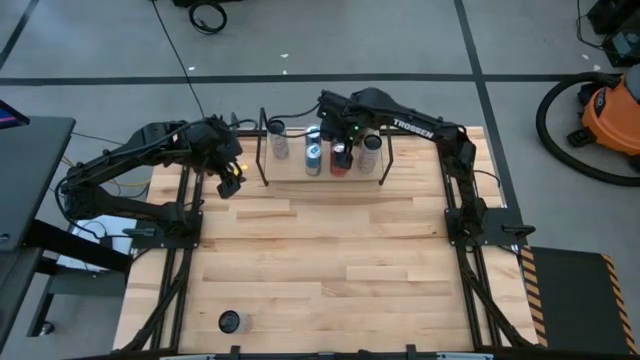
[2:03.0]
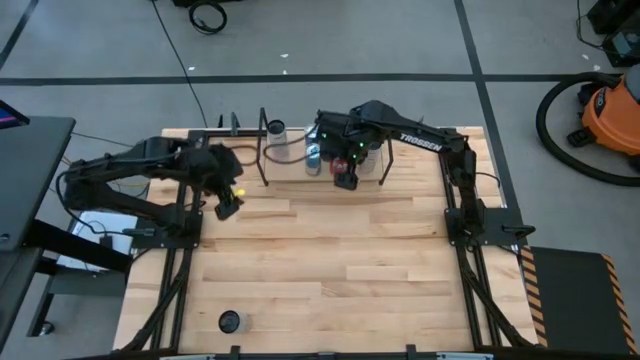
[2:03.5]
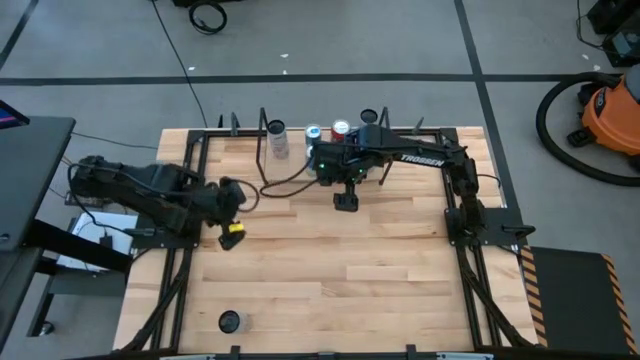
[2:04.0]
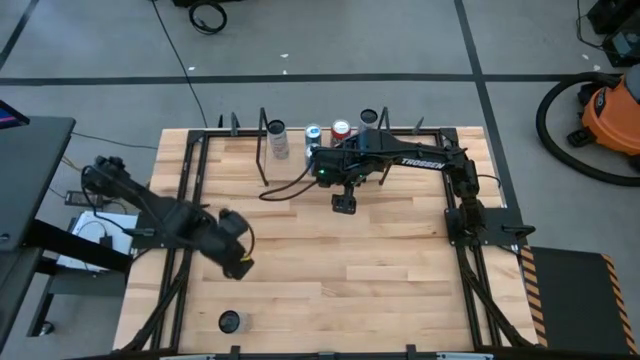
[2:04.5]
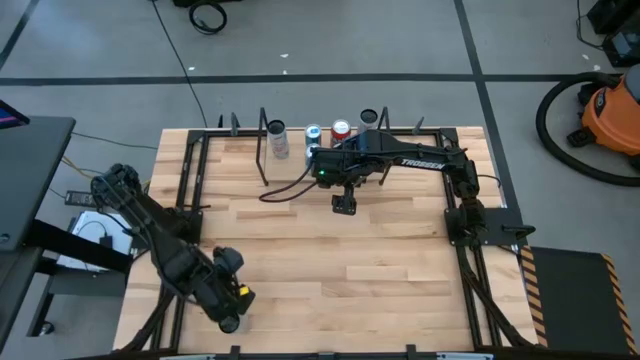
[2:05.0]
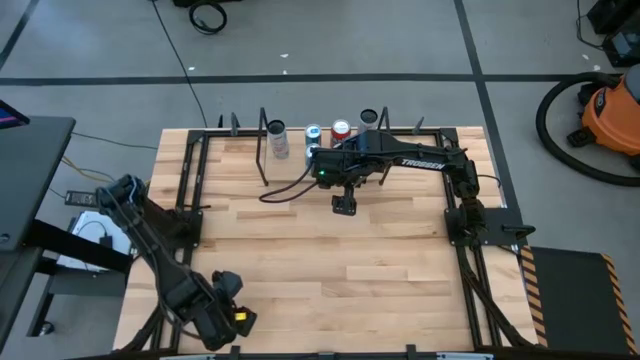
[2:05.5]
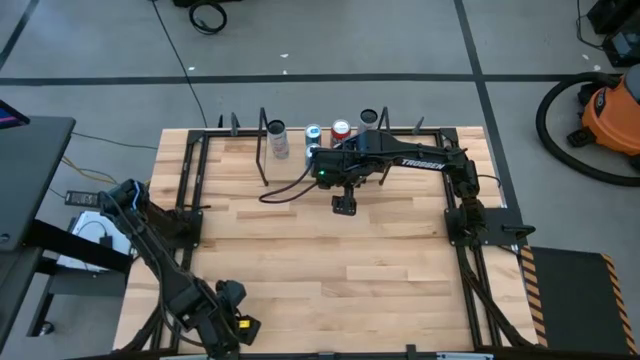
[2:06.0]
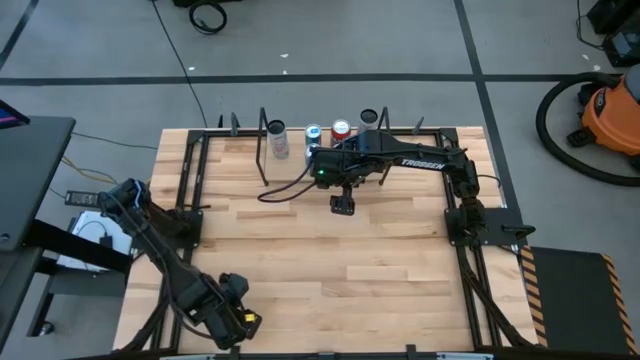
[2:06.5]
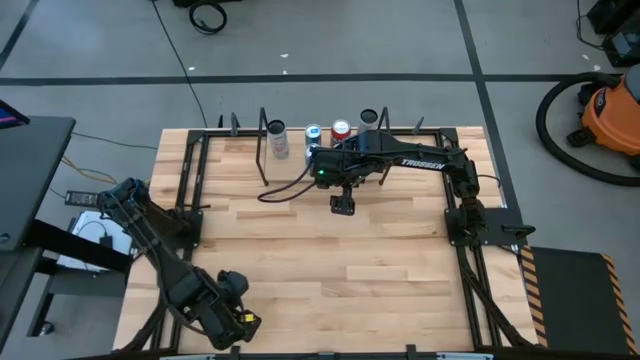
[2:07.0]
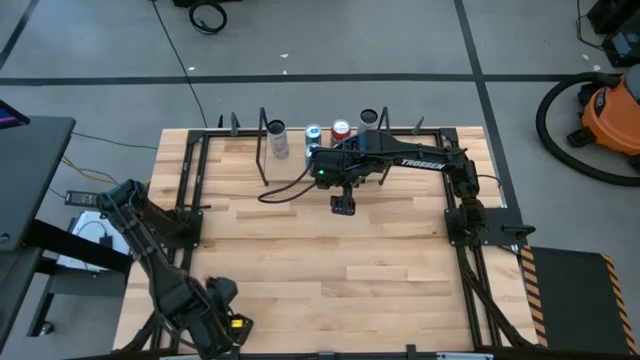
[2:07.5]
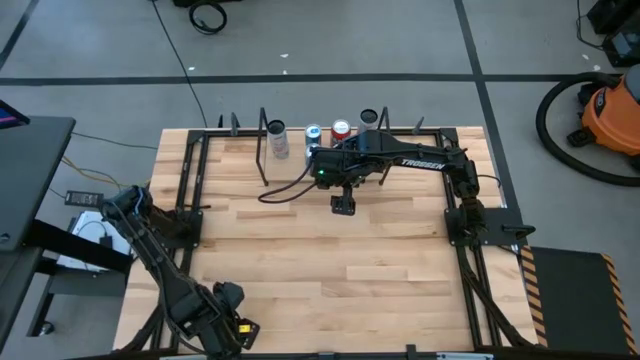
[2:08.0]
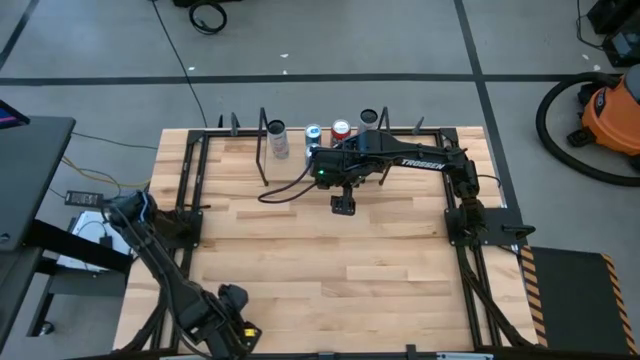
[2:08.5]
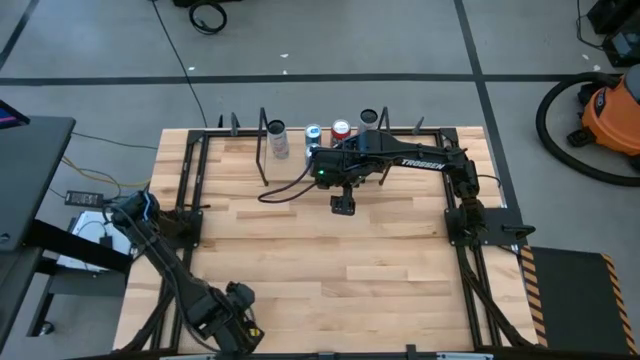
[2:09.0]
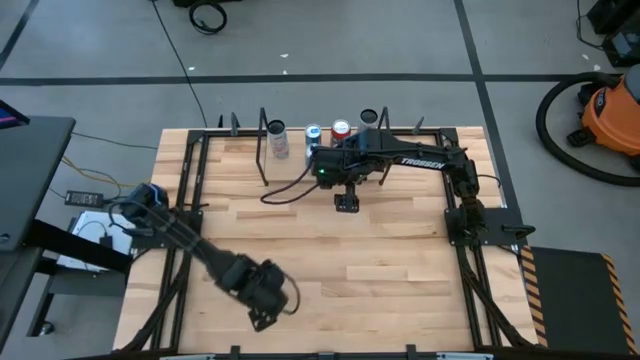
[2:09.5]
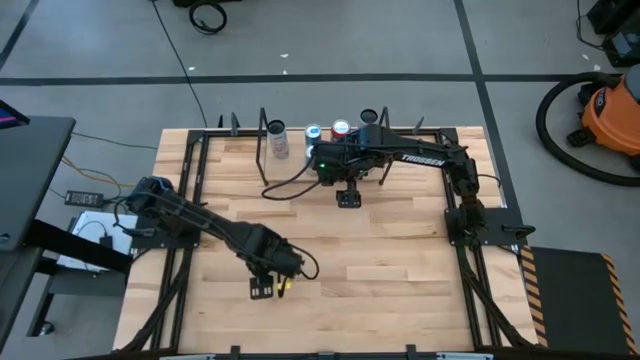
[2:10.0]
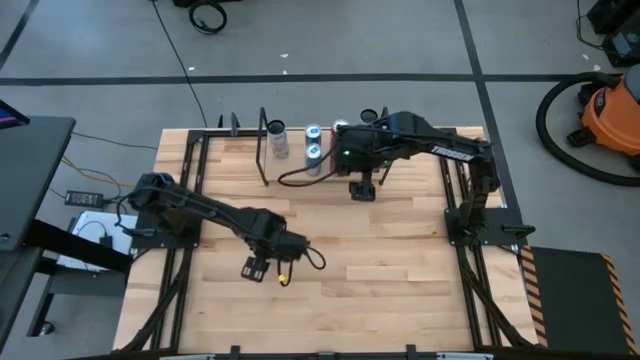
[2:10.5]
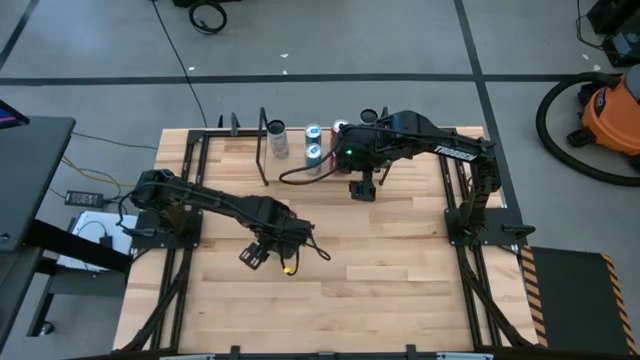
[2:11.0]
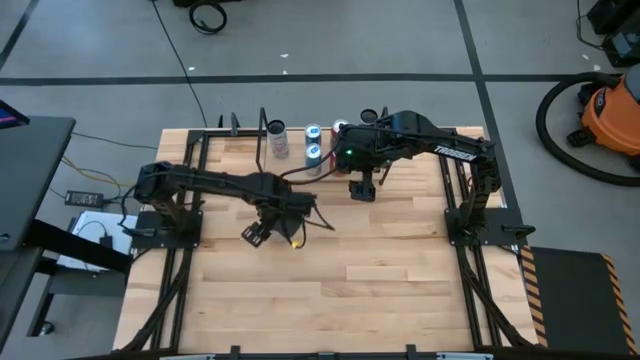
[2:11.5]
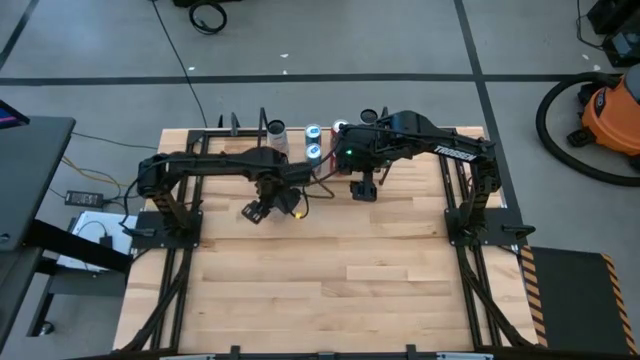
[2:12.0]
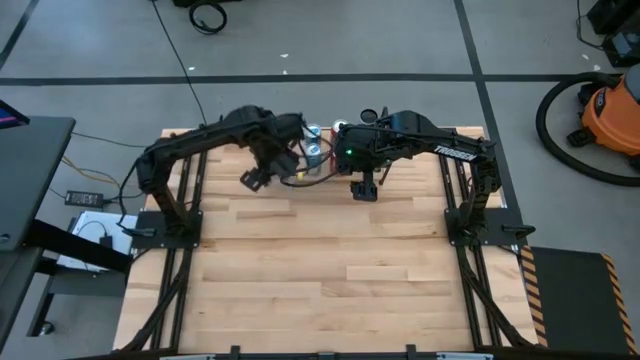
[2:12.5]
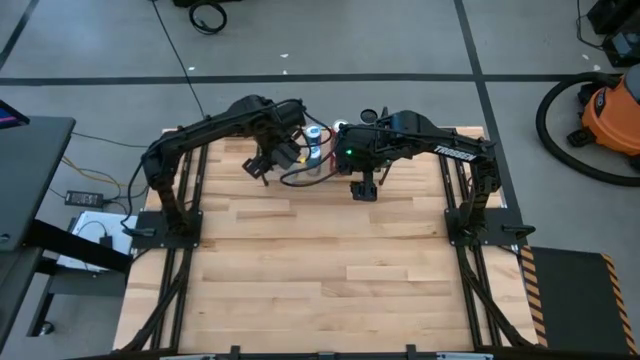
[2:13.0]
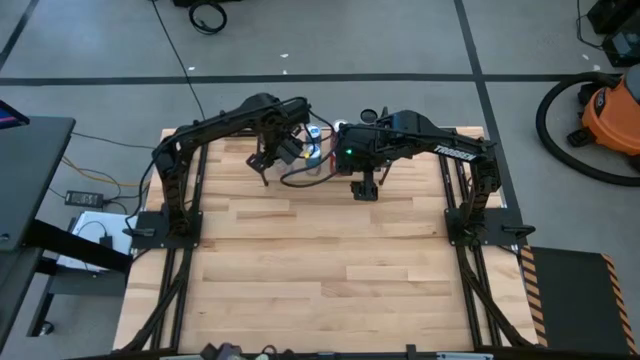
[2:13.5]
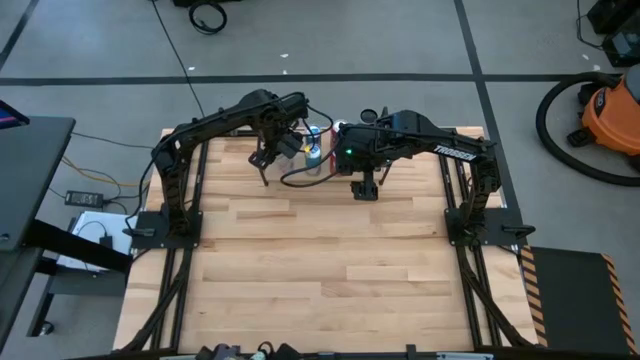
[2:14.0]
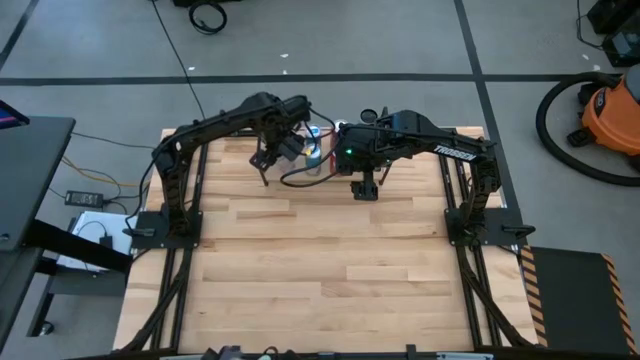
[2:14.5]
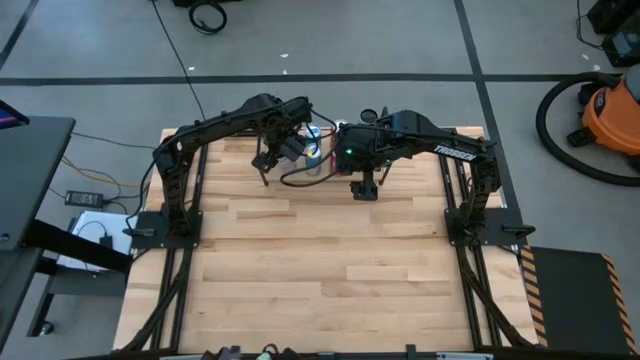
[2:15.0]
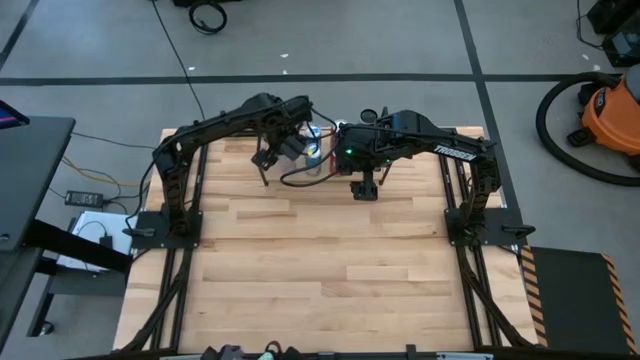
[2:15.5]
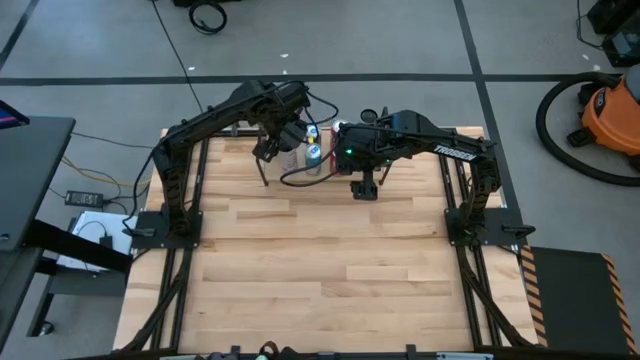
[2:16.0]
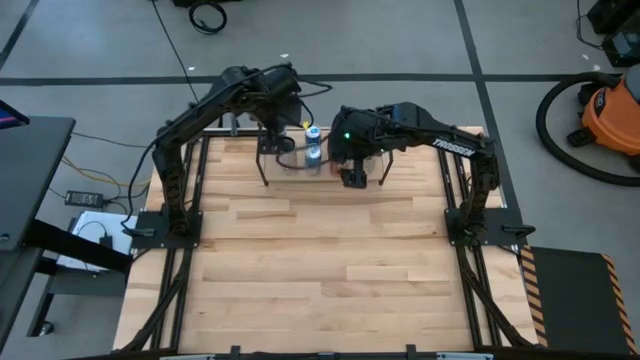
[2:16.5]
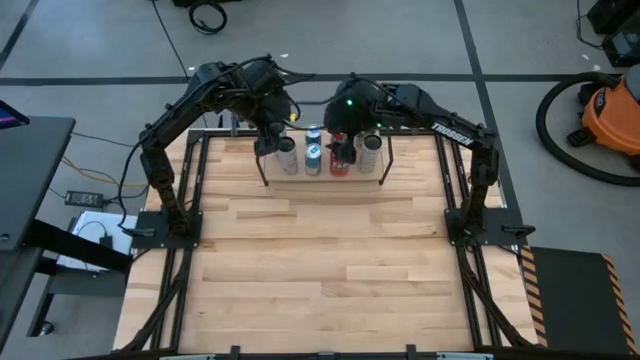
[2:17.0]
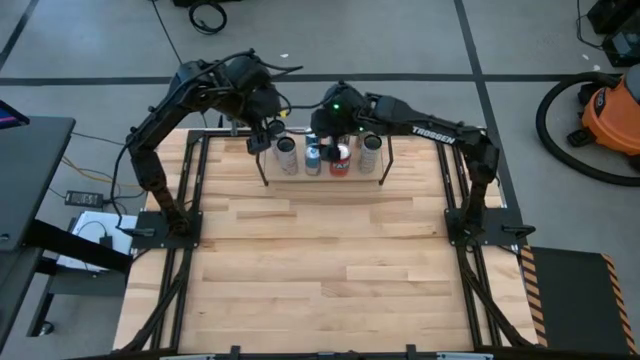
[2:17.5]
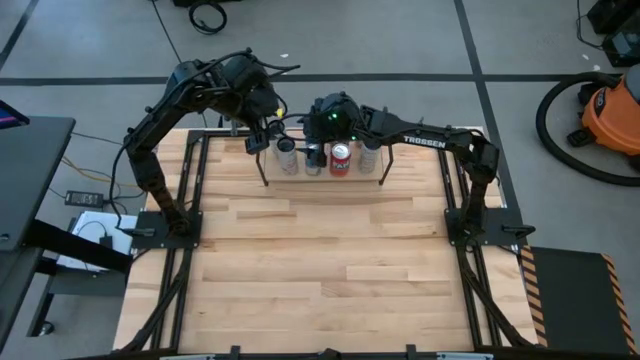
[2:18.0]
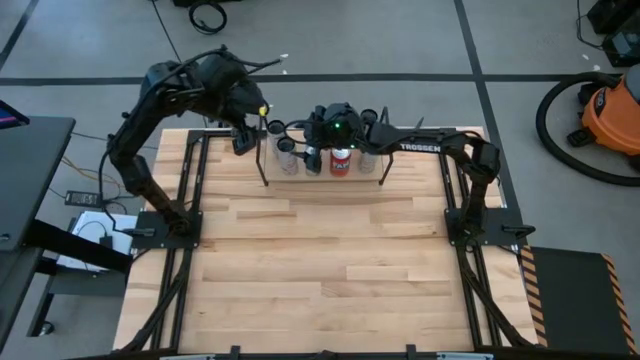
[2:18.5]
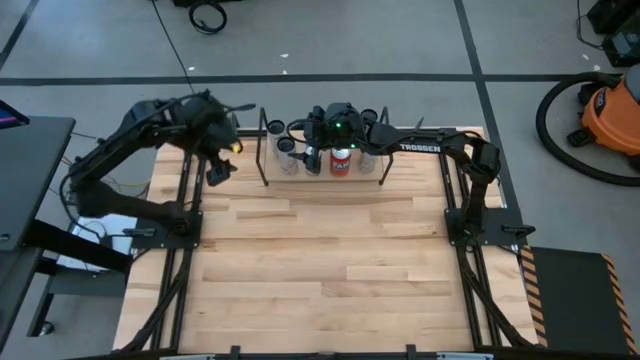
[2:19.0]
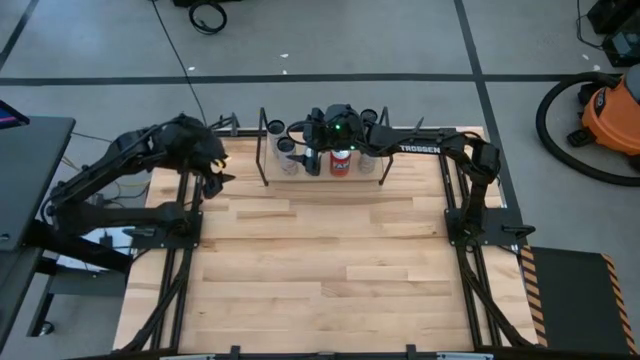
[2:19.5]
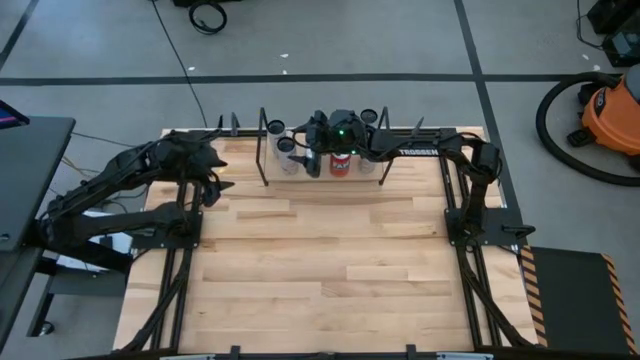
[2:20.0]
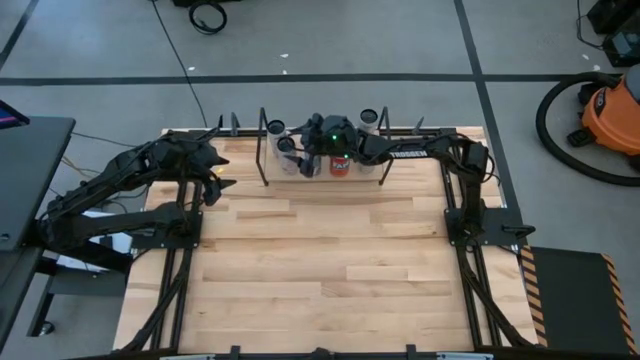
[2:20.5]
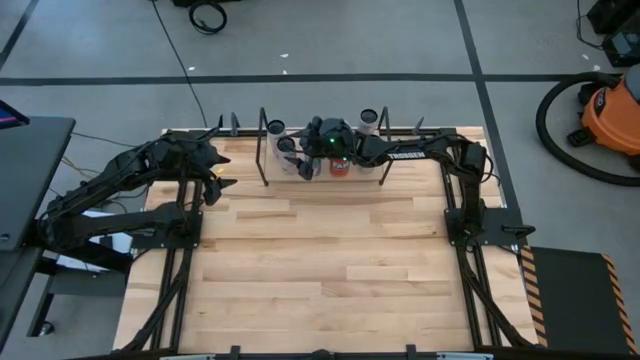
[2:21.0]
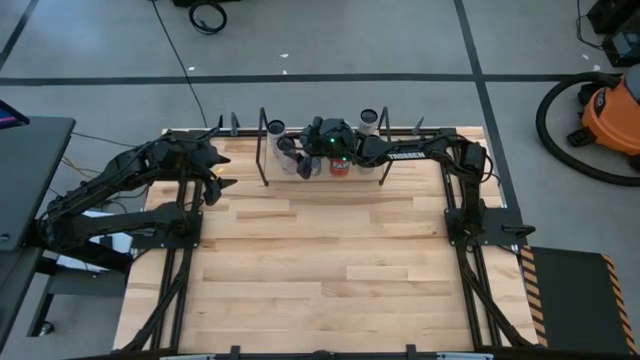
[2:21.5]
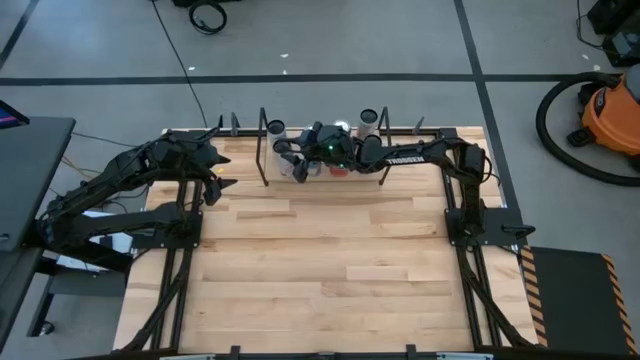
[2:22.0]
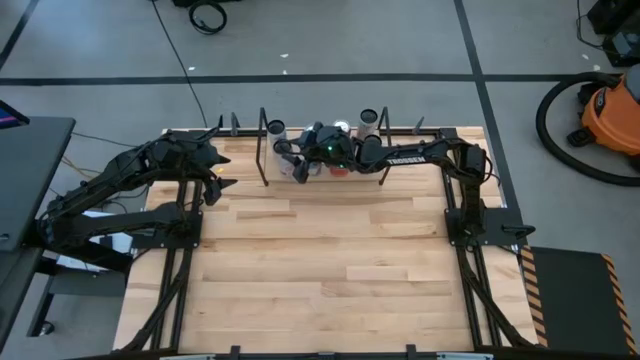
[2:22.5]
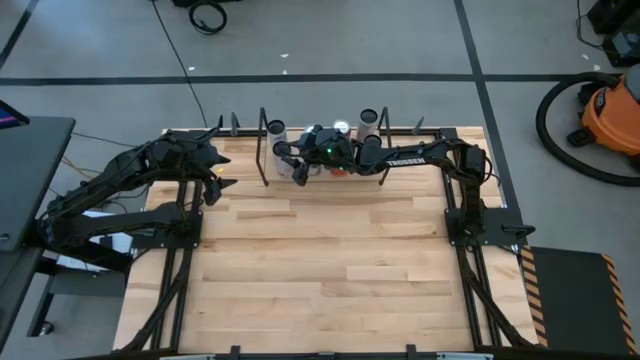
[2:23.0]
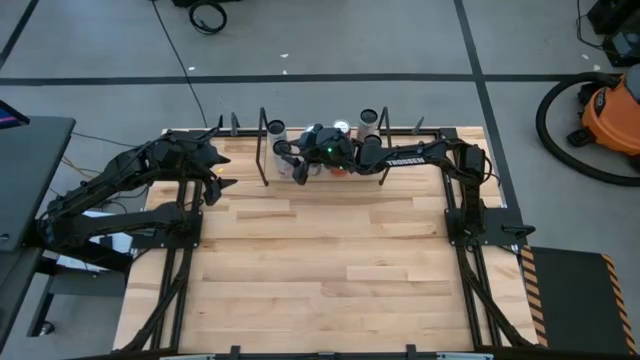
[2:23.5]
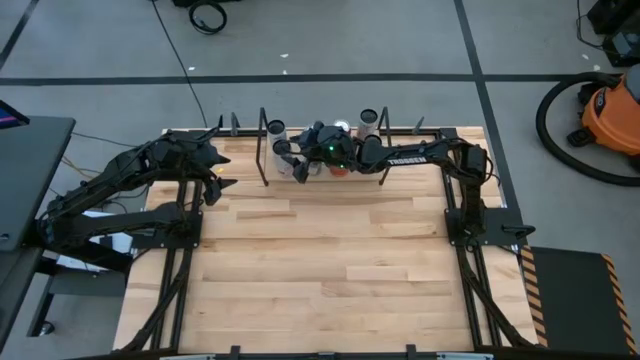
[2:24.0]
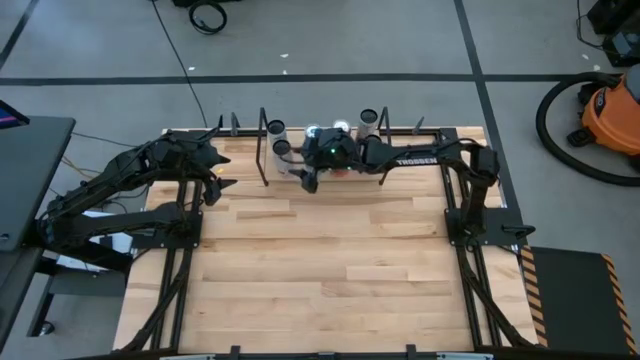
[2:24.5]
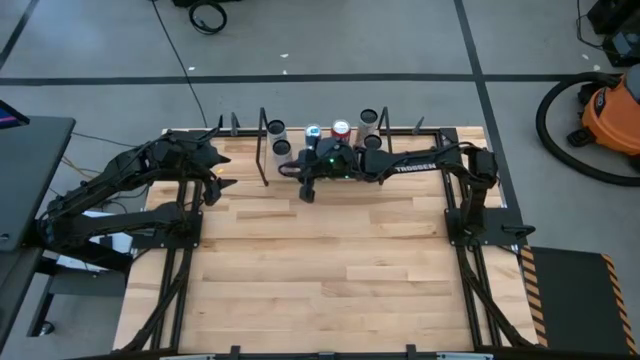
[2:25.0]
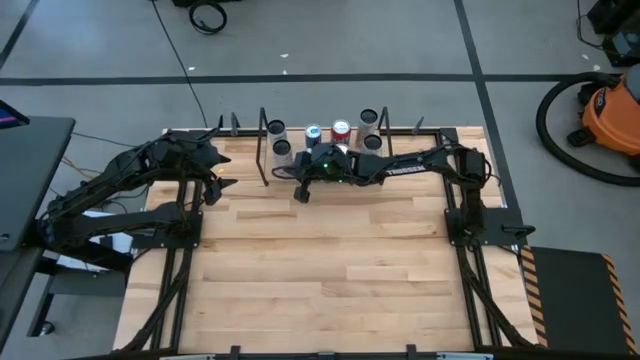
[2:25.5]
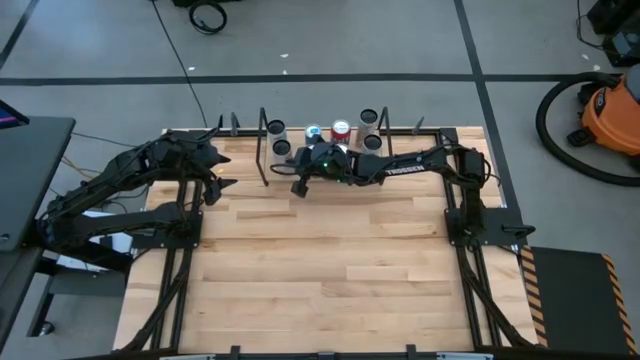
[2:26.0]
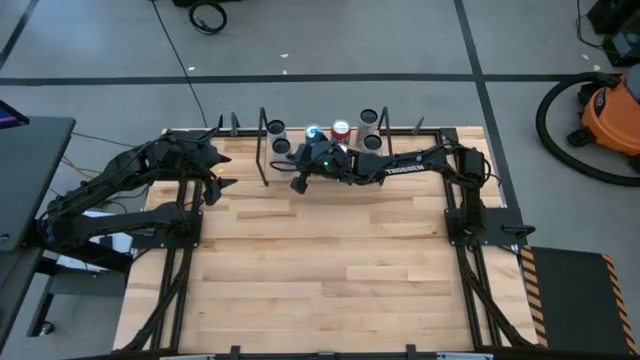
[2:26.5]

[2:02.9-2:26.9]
Task: Place canned beverage on shelf
Put the white pink soda can on the shelf aligned with the other white pink soda can
